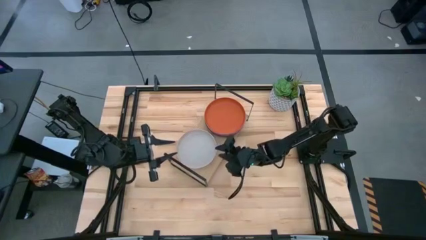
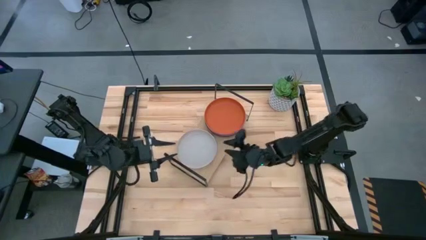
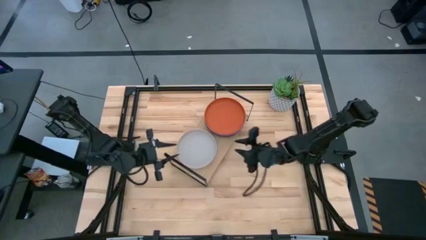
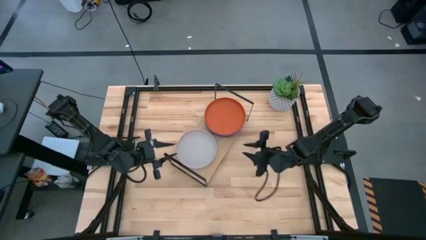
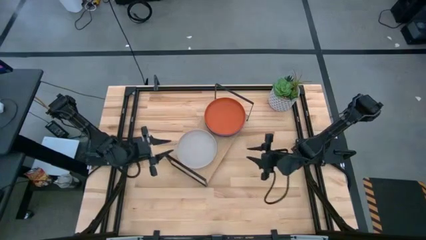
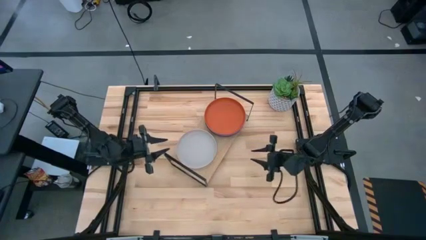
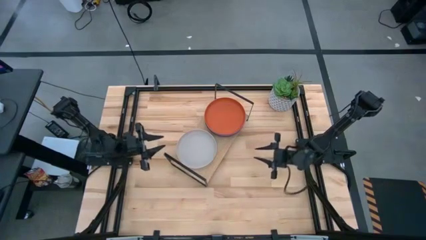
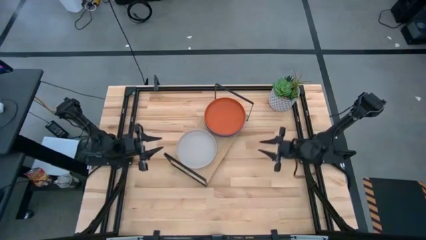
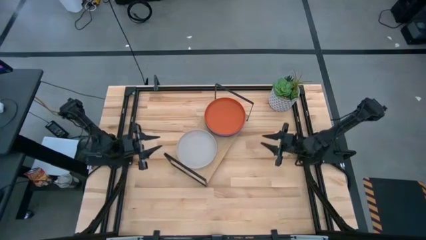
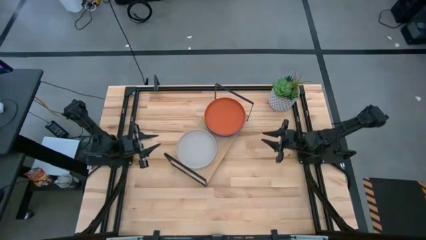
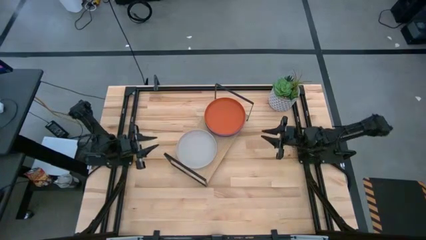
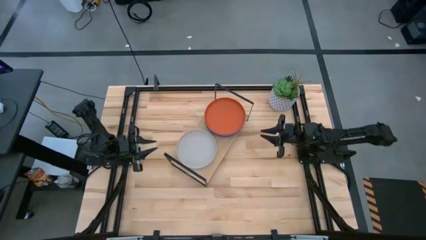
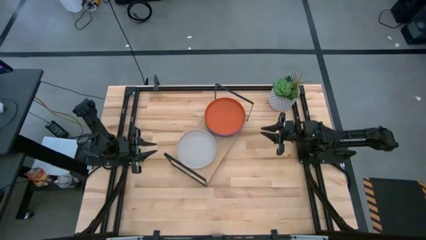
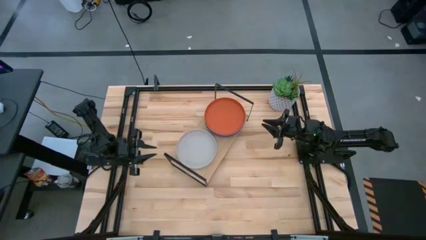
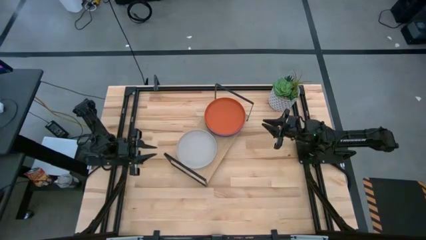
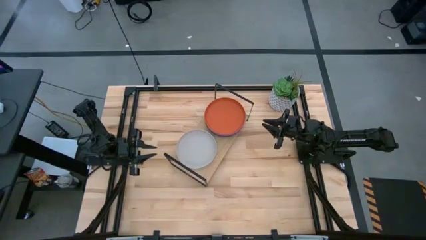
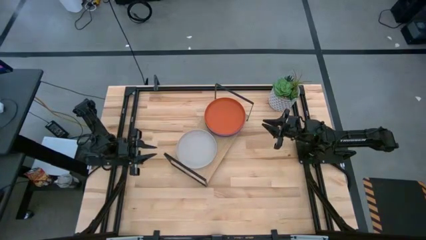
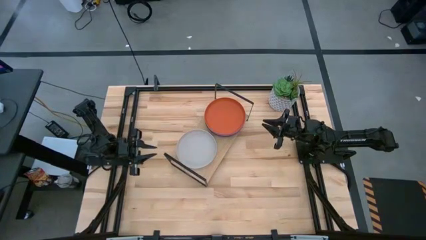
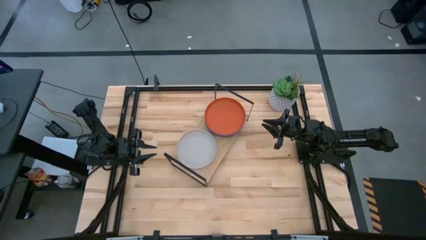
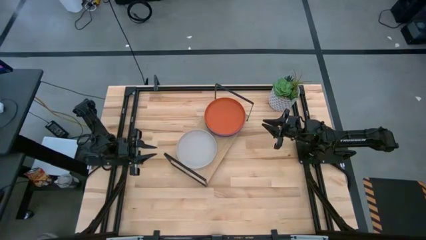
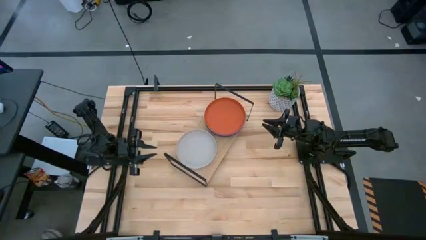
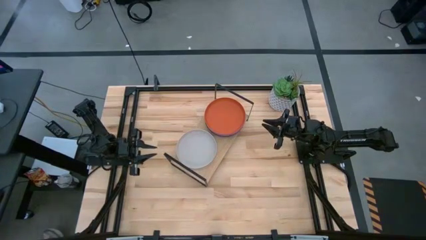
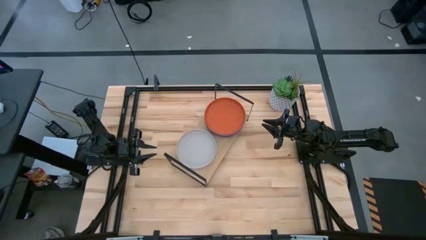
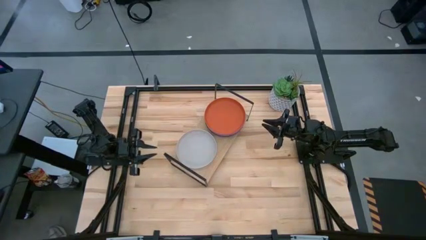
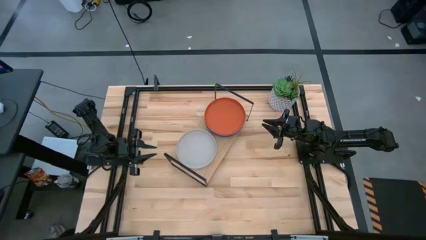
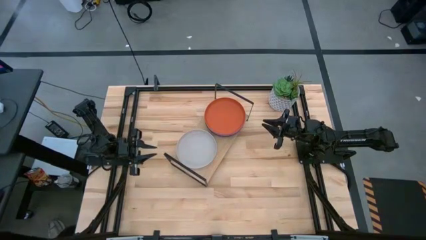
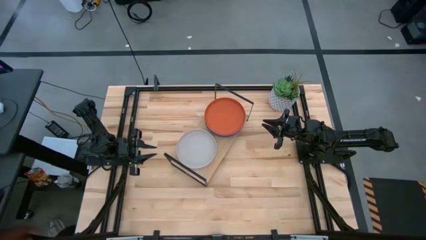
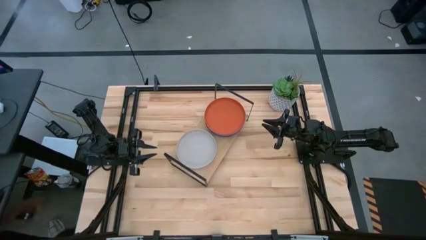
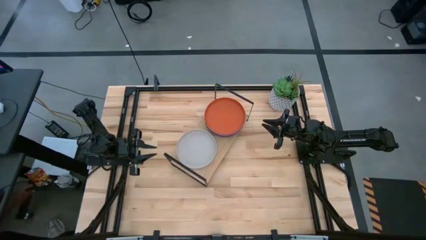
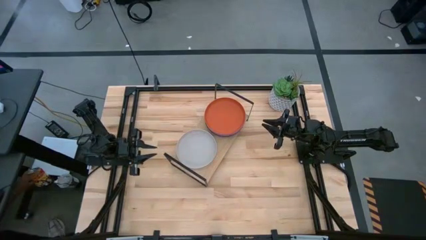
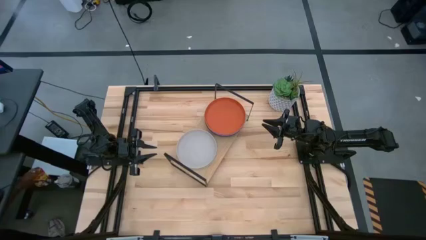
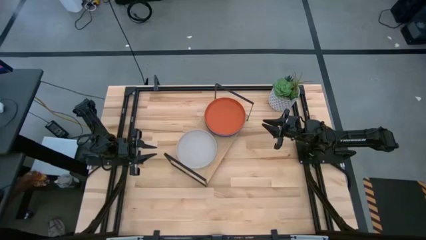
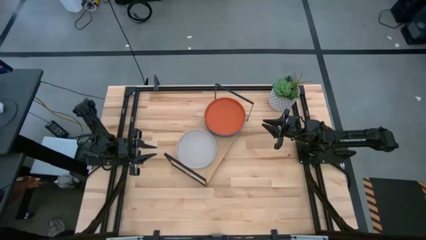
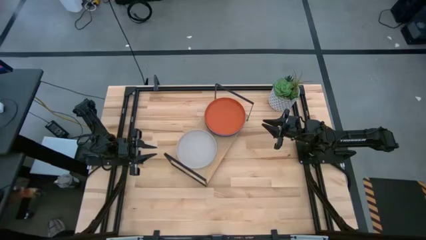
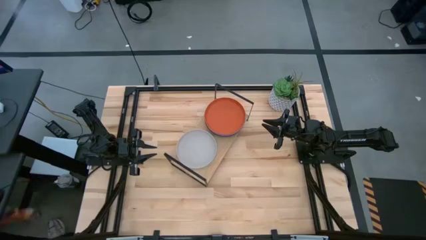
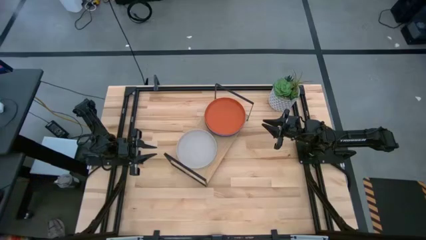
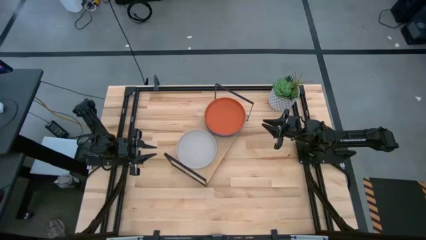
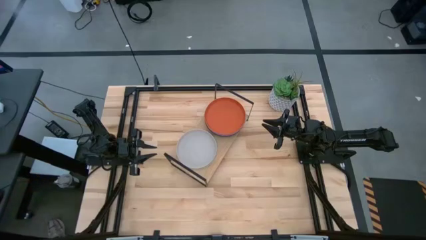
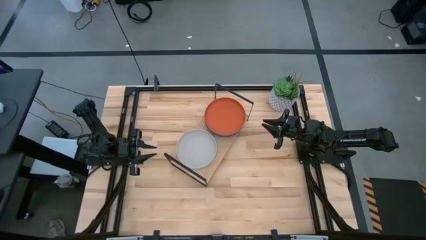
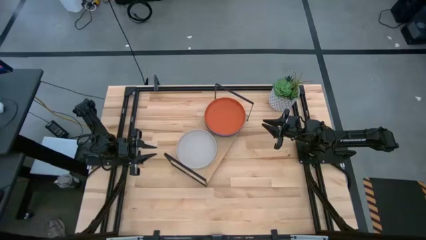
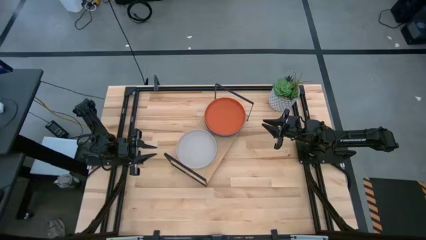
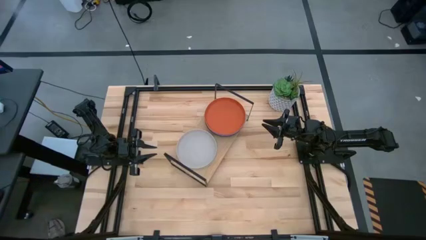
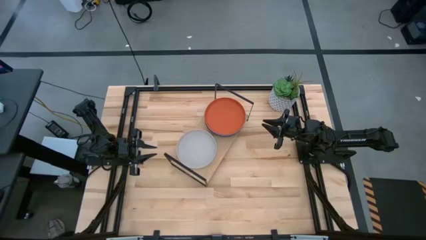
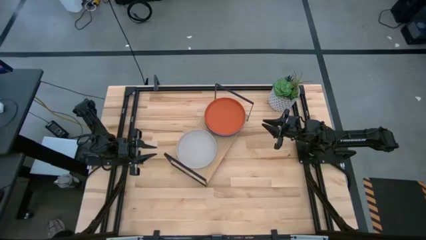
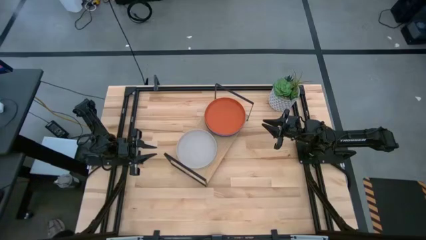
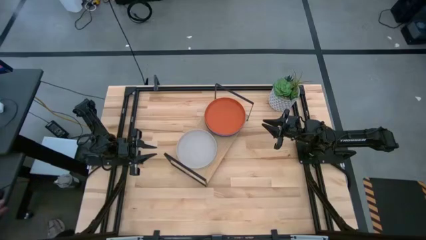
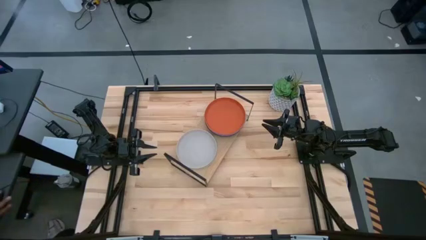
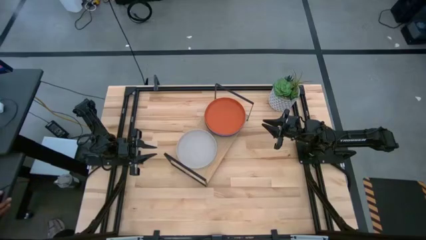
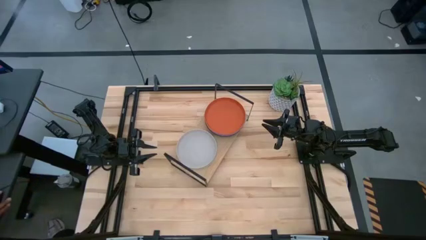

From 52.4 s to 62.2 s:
Task: Place and stack plates onto a shelf
Return to home position

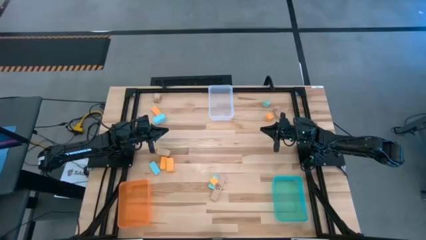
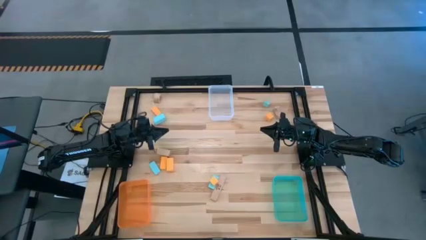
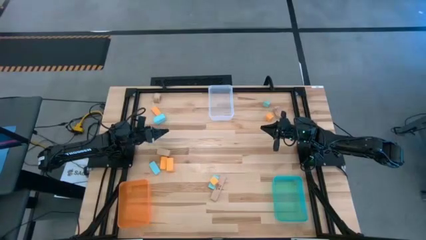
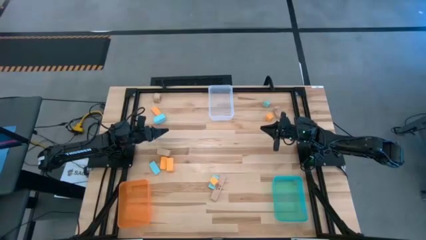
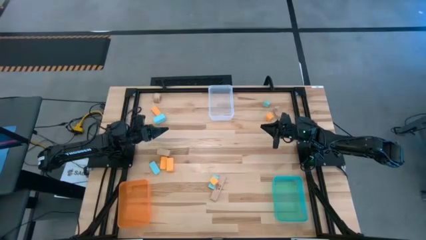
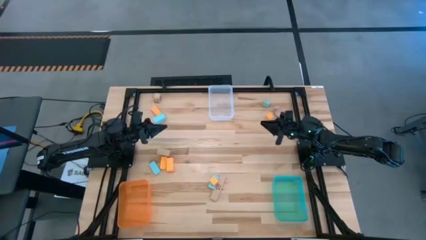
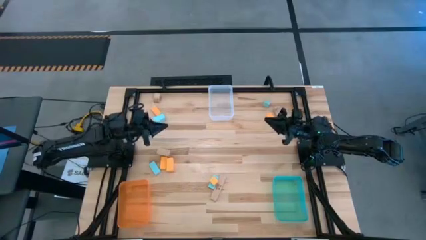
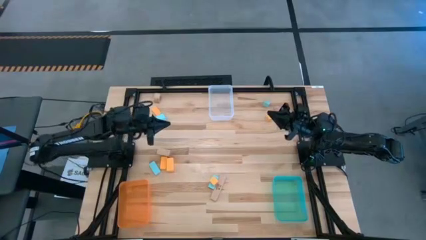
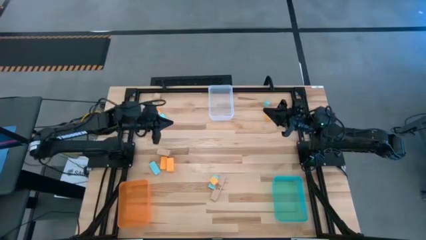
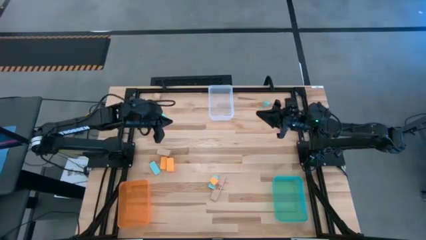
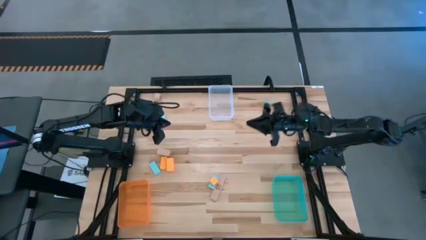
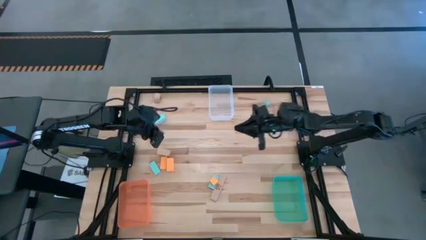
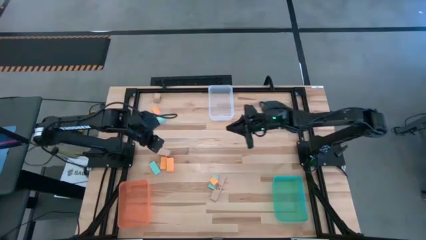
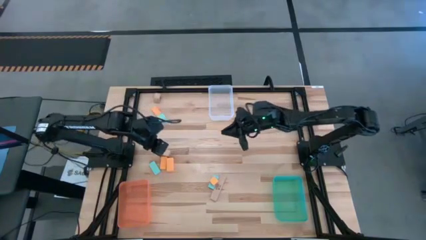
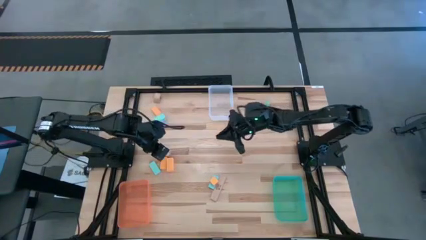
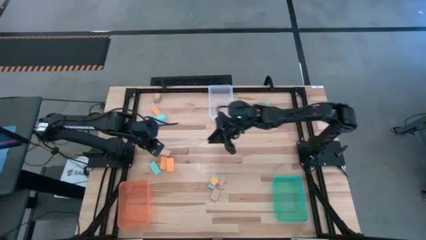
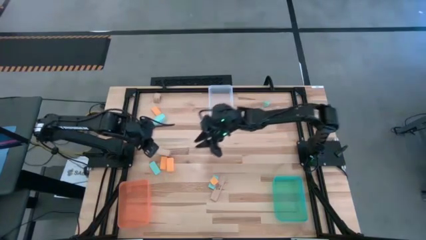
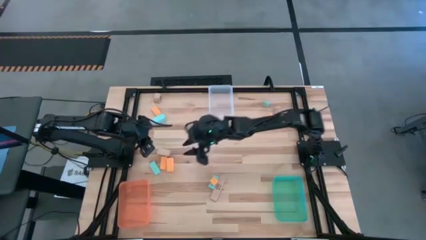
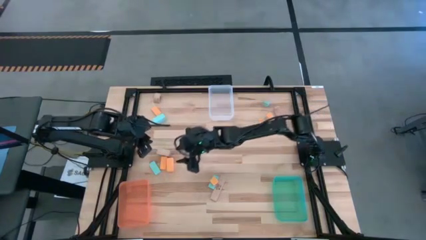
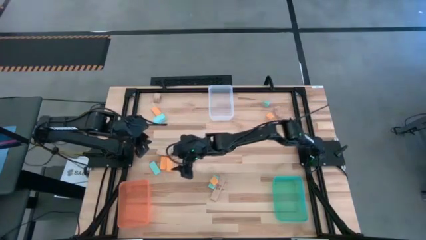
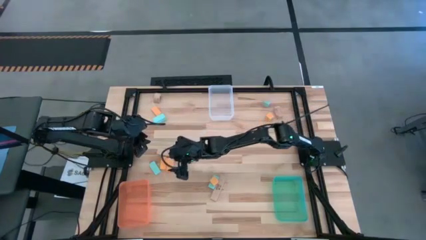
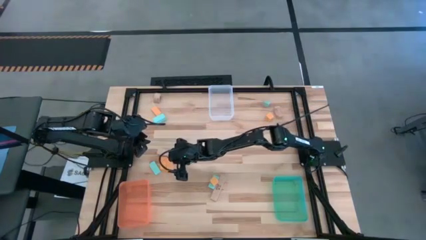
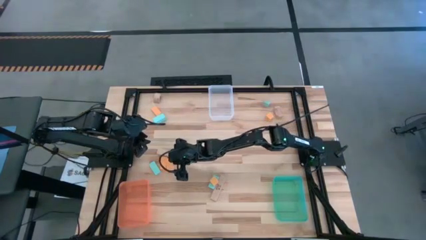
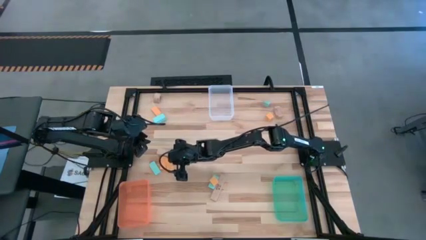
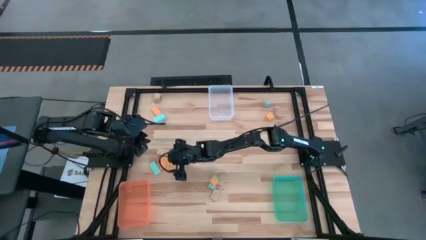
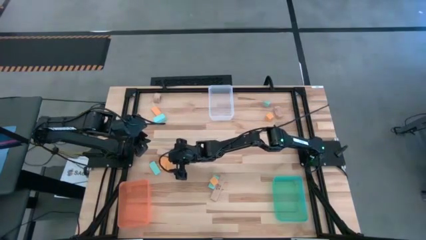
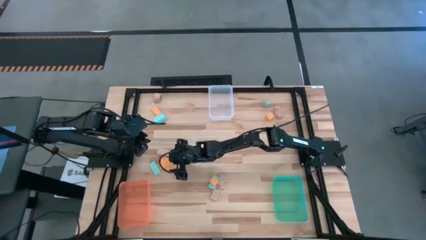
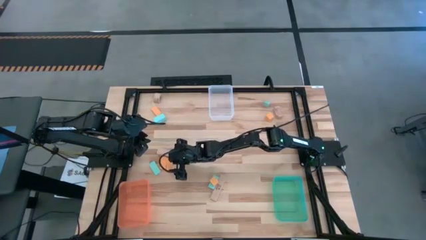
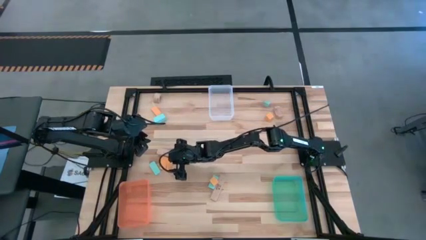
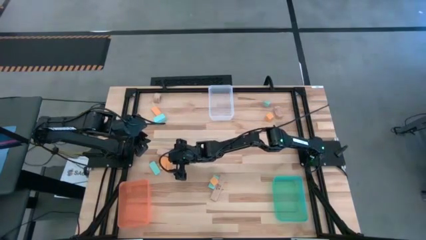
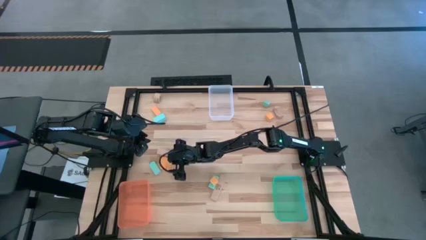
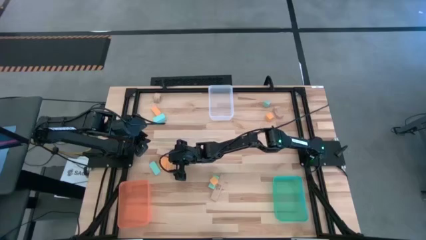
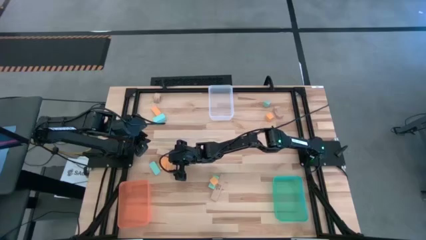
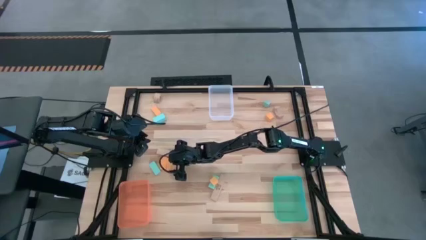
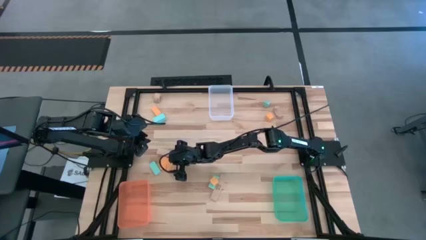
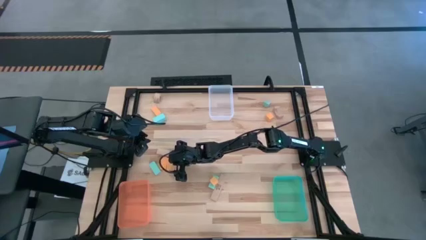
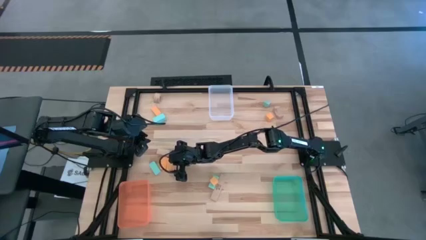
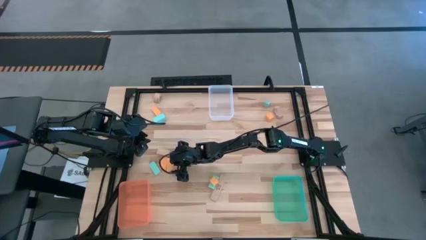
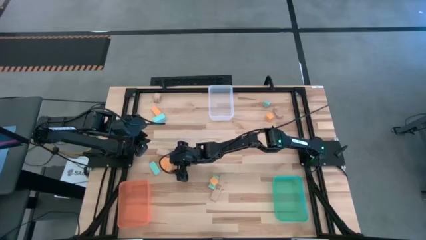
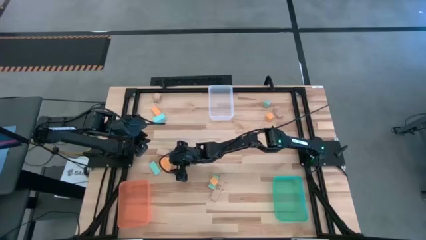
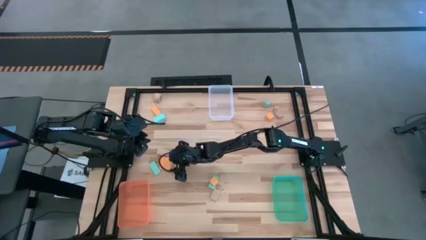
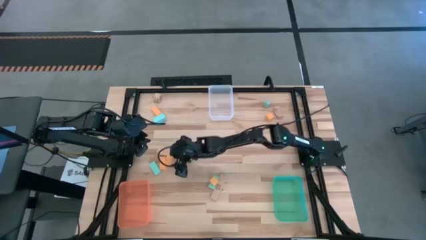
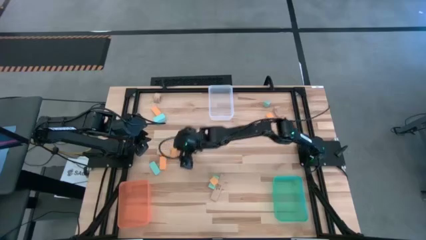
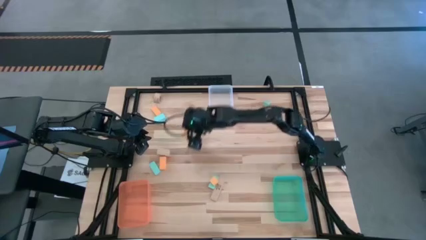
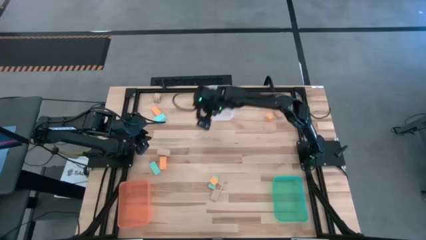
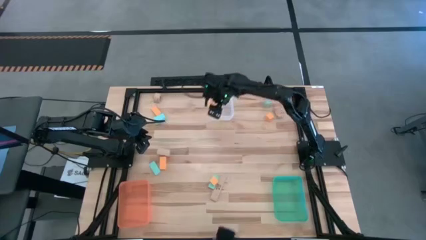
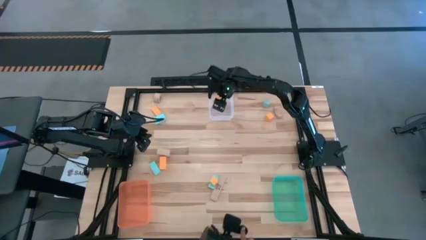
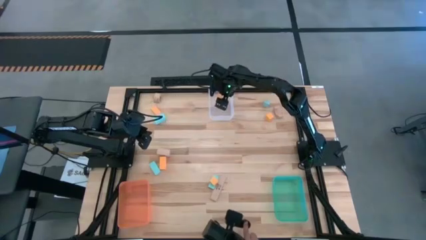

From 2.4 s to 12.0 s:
Task: Sort & place blocks by color
Put the orange block into the transparent white bin
